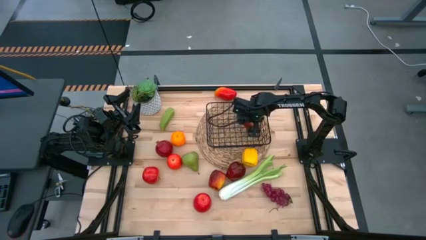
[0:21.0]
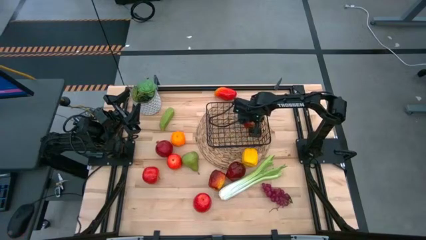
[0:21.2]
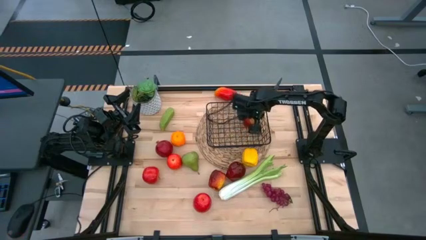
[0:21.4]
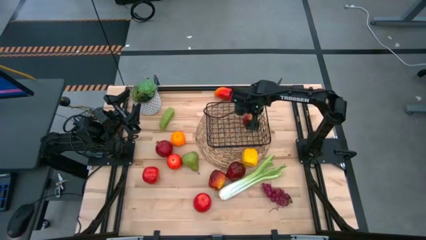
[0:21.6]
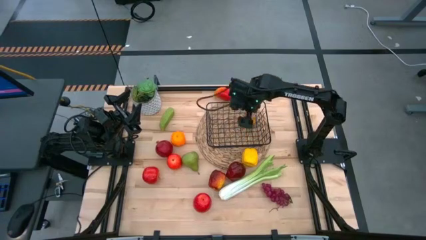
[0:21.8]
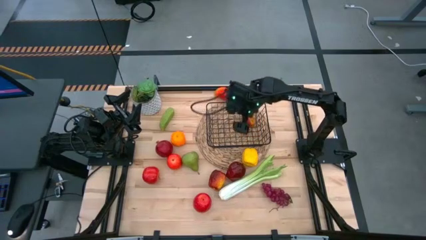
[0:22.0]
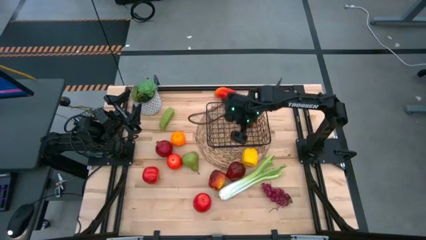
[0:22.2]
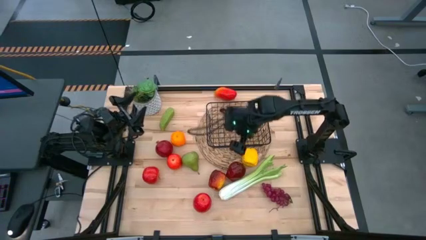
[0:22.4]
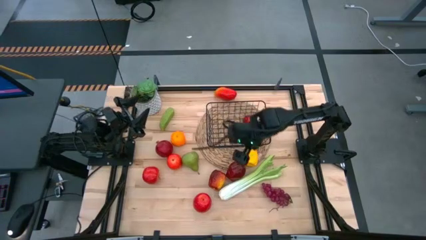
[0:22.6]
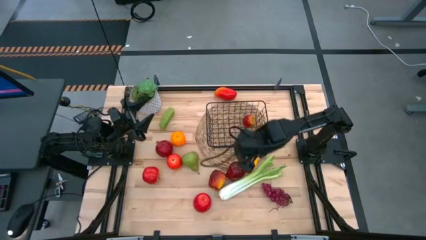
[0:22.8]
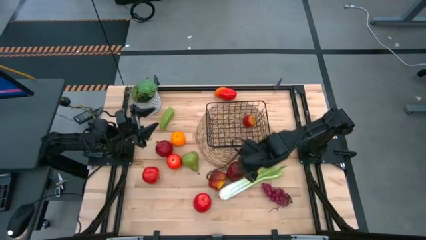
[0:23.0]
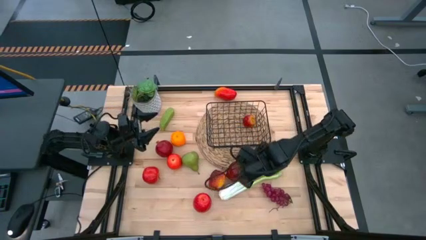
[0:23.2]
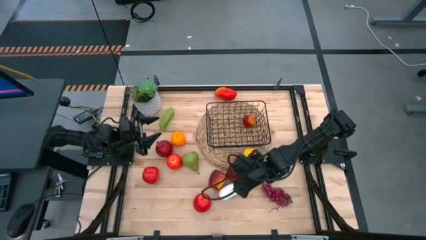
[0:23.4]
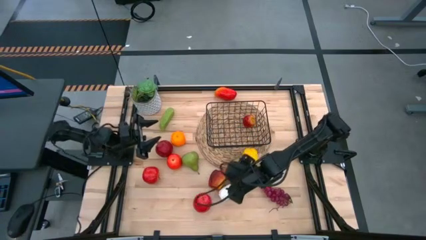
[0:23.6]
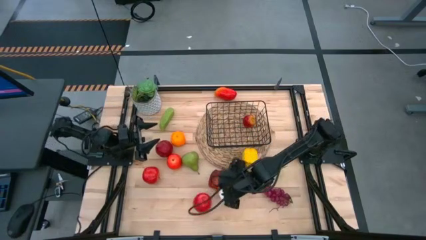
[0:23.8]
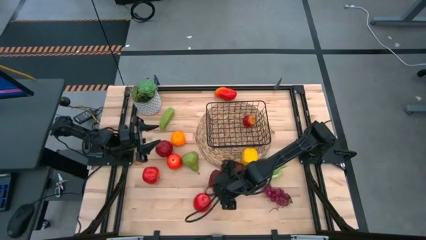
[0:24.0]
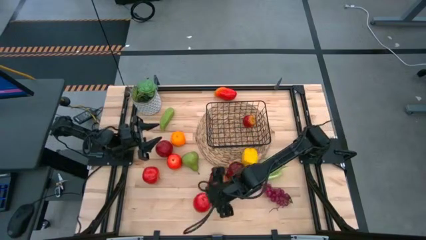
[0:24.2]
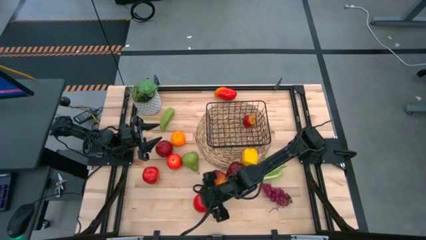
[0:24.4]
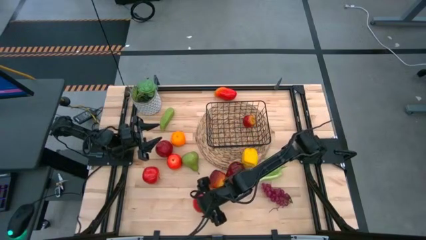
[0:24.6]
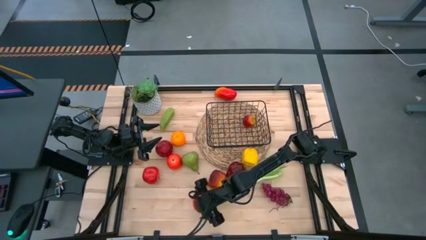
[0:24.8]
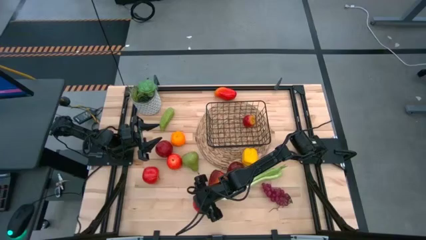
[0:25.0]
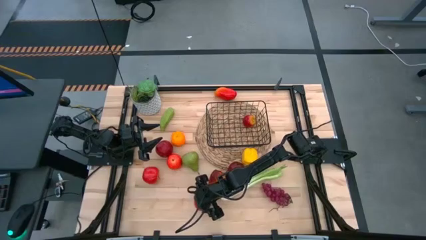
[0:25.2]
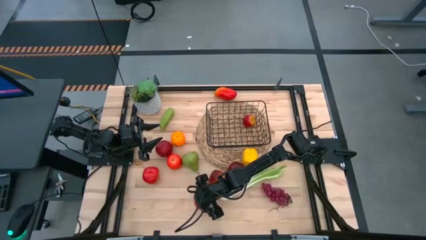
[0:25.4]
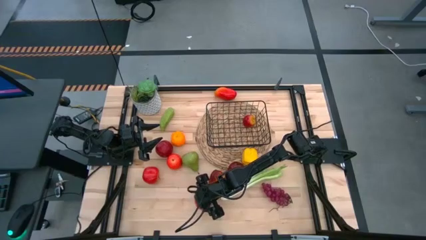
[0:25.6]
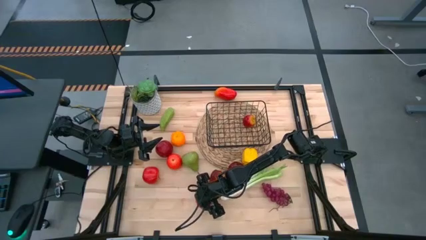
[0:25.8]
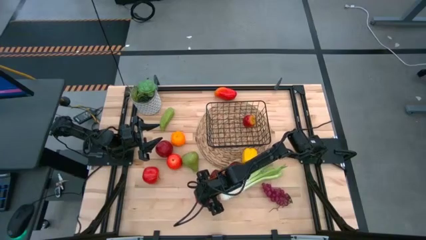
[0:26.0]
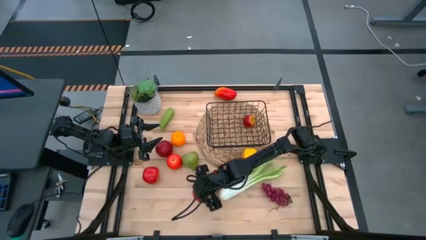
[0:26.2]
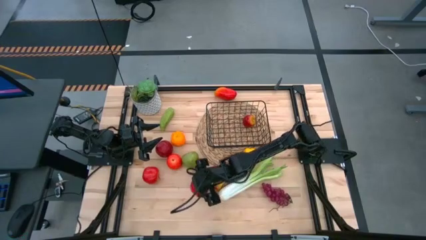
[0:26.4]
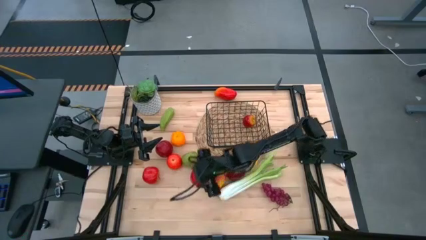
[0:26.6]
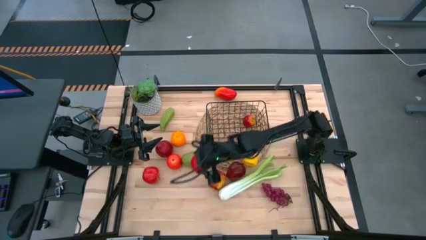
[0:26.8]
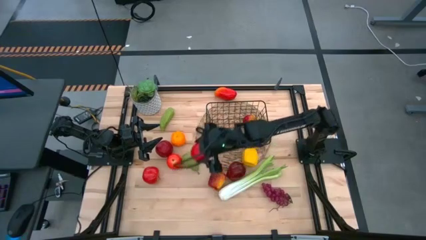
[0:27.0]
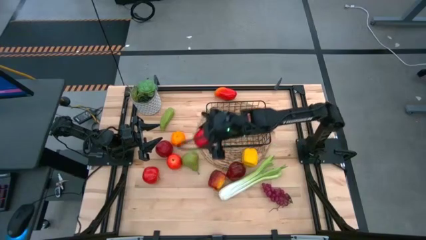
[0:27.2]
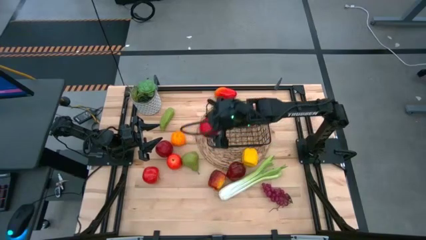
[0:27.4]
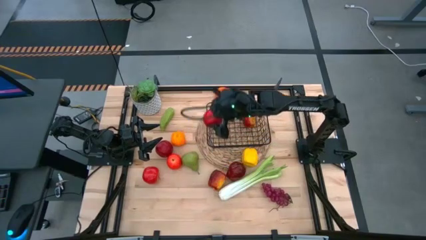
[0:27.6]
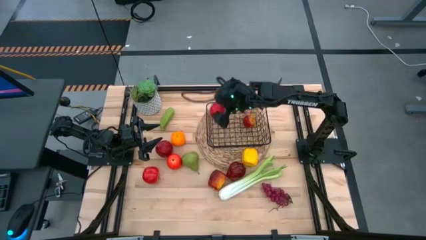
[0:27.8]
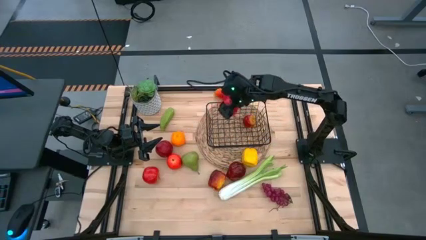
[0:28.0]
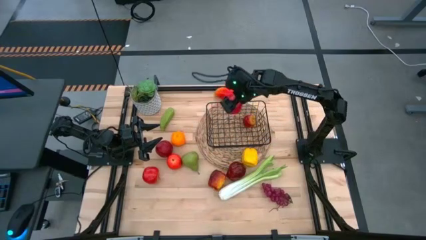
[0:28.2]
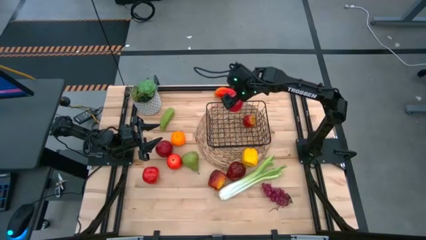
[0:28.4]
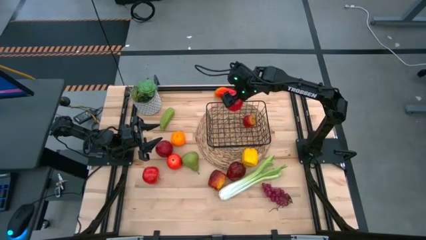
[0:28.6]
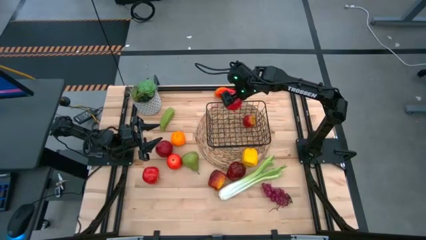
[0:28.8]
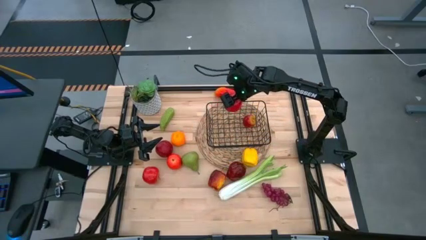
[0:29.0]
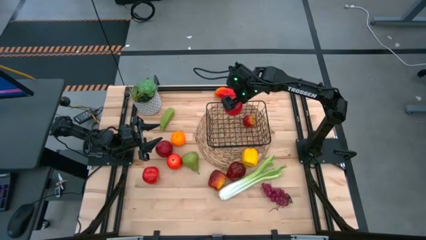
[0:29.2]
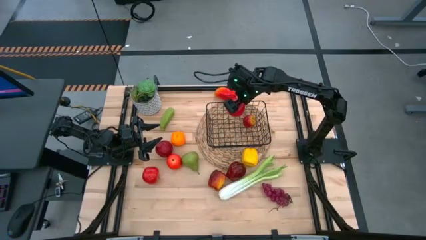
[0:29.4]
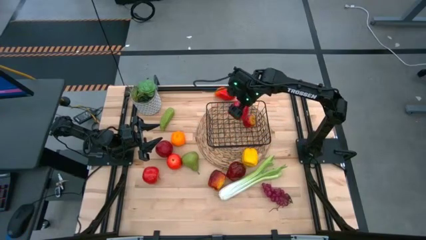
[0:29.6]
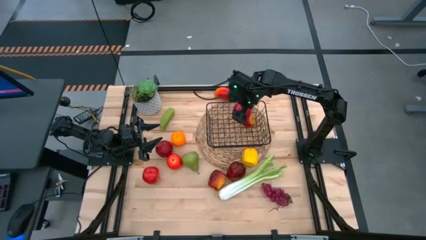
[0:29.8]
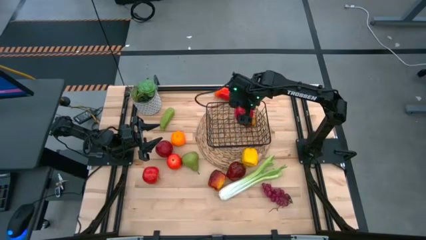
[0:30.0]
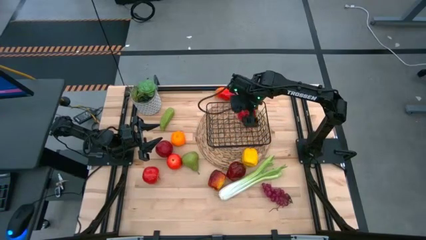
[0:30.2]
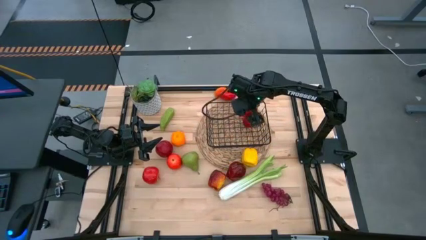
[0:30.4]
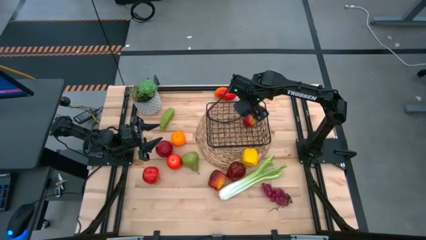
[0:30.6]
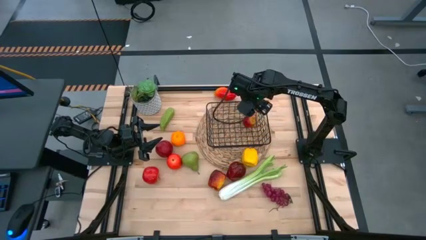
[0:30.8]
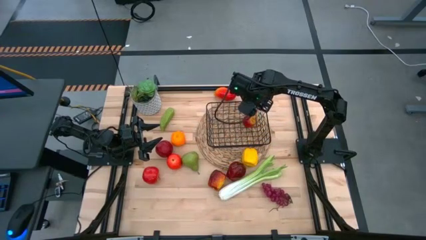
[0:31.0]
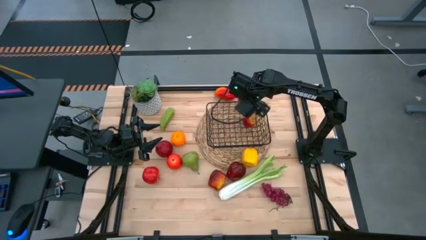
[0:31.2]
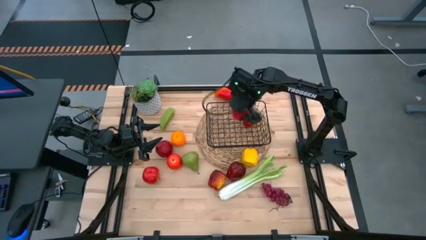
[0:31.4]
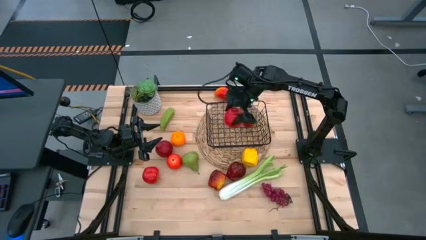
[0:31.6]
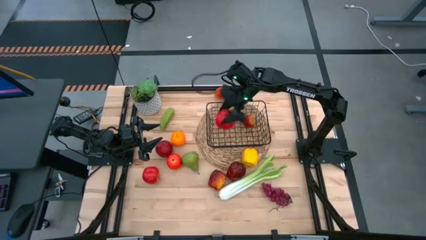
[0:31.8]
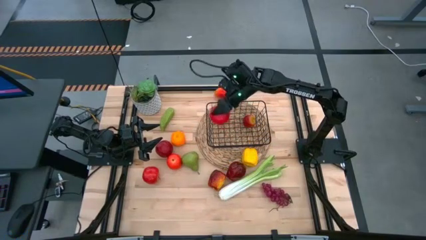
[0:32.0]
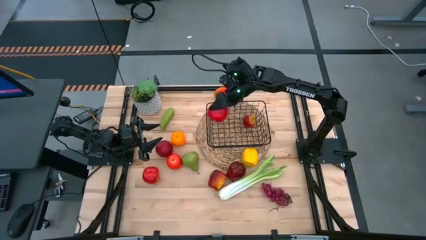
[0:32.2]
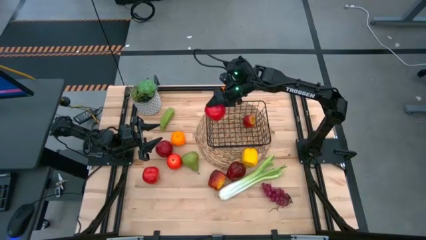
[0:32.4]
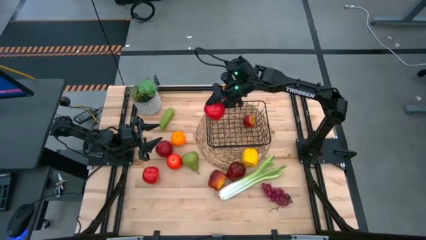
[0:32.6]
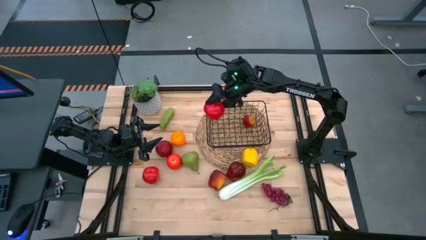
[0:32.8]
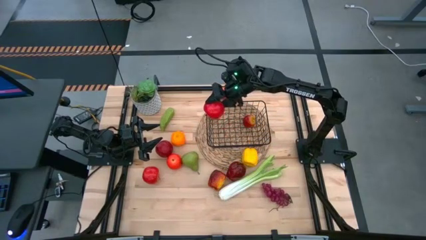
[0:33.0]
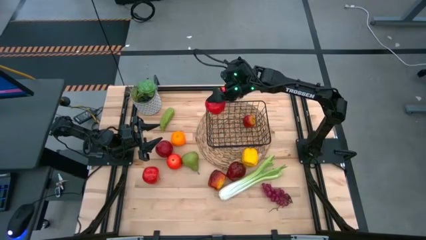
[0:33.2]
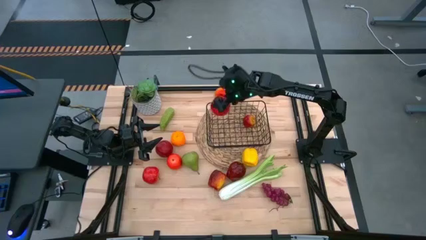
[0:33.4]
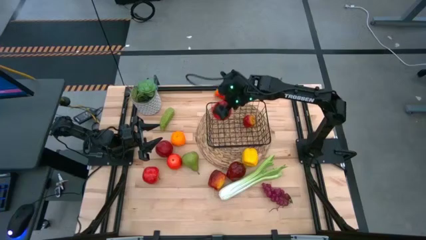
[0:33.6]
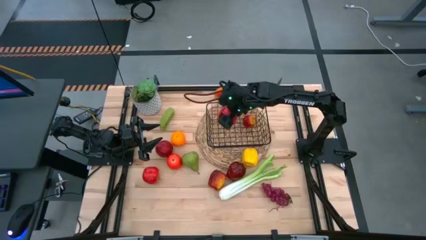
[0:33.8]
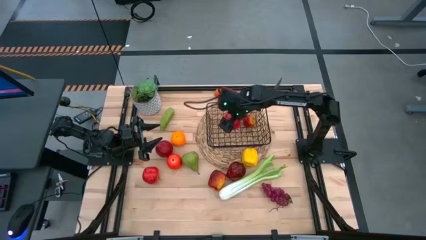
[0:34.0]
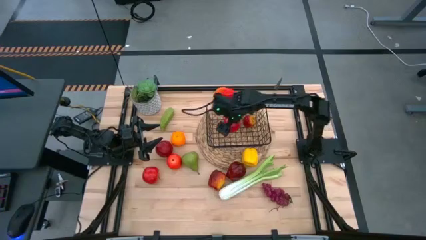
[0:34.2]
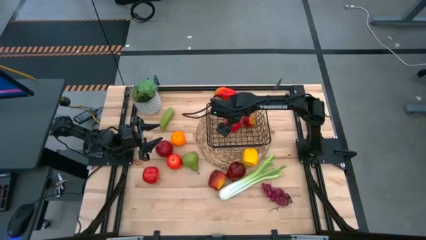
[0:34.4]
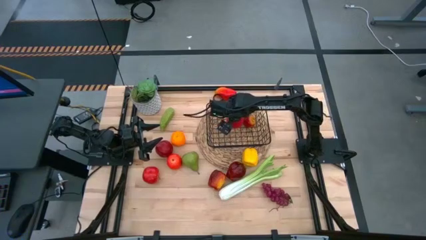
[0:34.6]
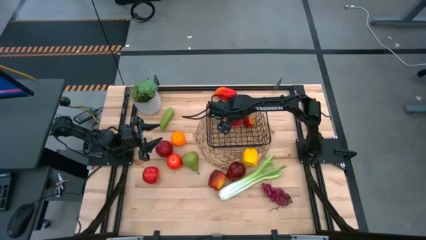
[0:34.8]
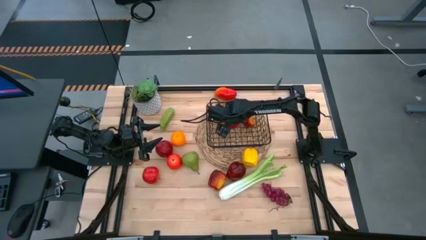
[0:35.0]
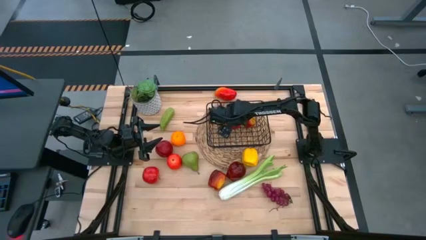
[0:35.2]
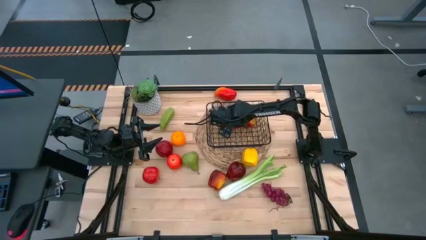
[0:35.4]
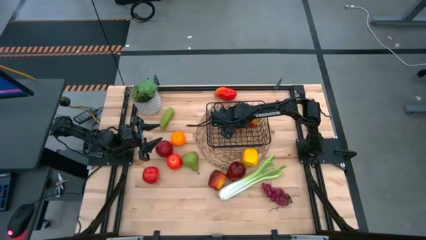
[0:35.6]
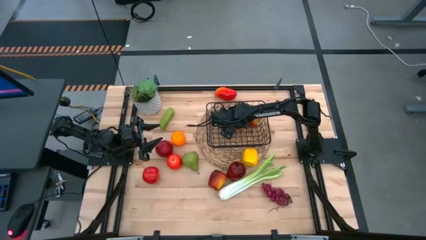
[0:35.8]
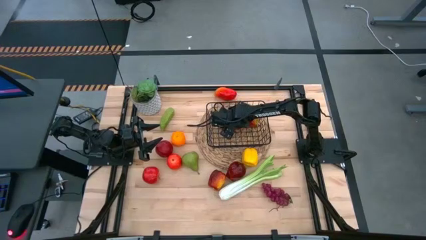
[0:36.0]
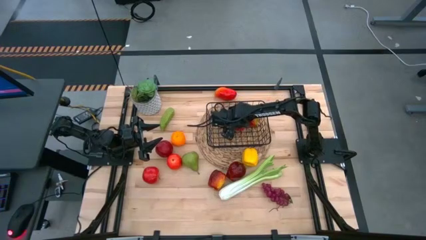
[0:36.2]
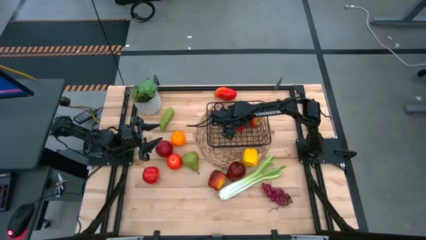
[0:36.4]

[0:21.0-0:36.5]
Task: Build produce basket
Put the red apple into the black wire basket

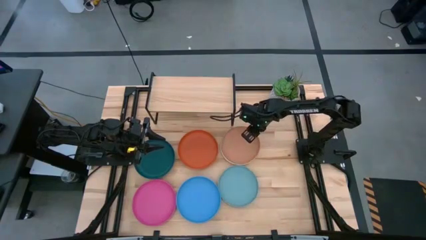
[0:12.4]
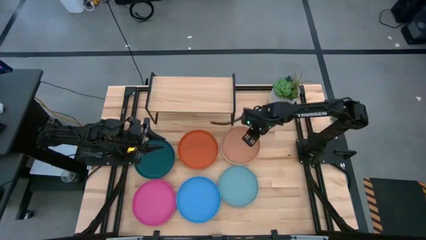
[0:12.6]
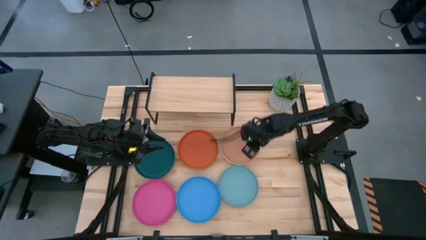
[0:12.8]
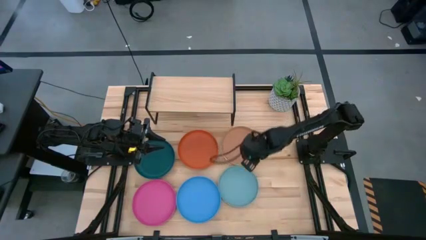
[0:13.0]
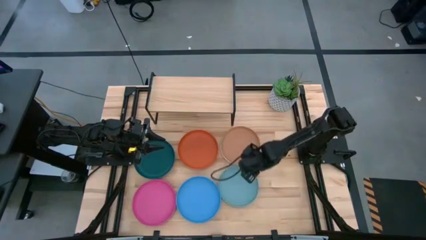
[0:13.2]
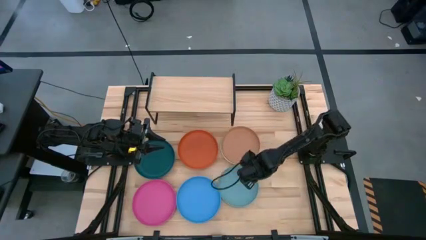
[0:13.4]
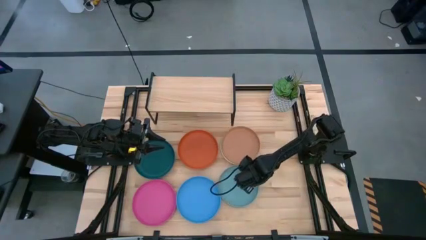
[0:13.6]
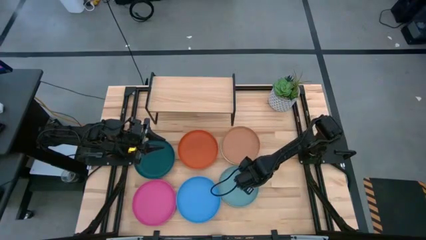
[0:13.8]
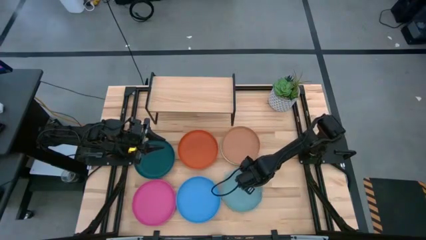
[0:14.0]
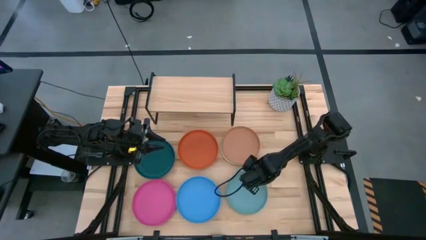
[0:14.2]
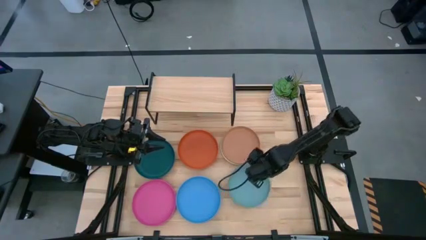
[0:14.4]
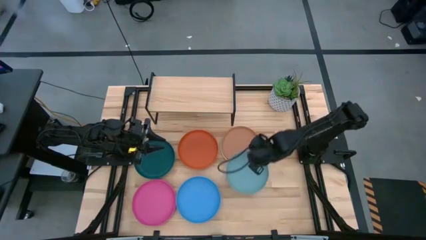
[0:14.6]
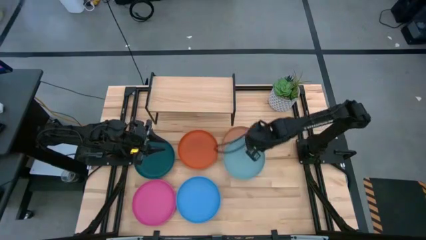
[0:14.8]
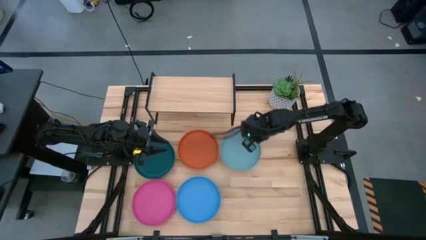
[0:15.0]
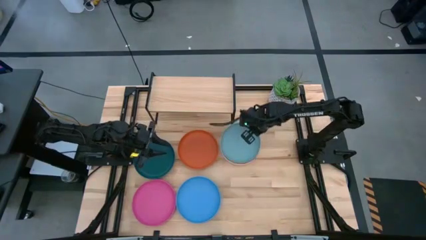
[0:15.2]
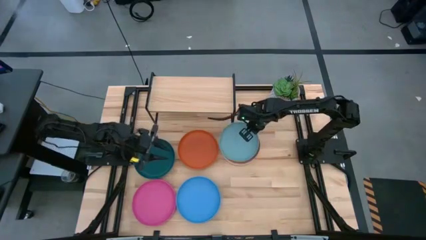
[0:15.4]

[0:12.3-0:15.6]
Task: Place and stack plates onto a shelf
Stack the light blue plate on top of the brown plate
